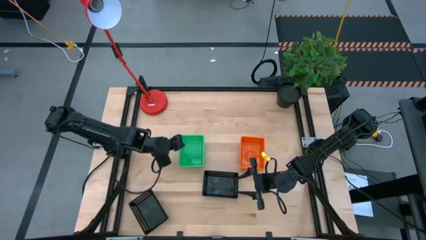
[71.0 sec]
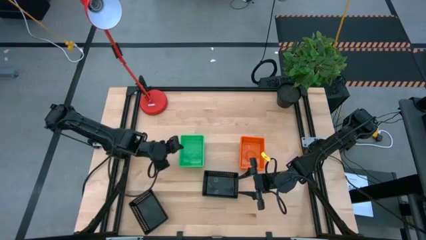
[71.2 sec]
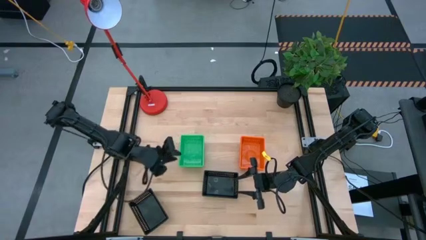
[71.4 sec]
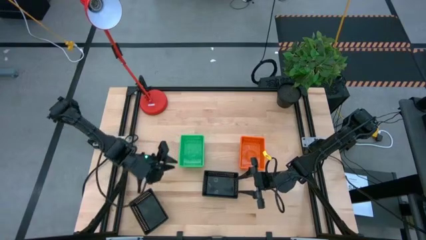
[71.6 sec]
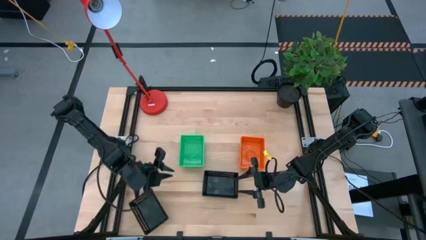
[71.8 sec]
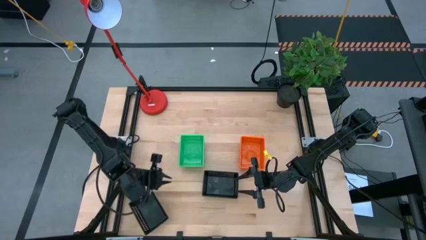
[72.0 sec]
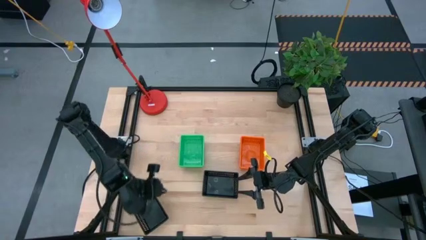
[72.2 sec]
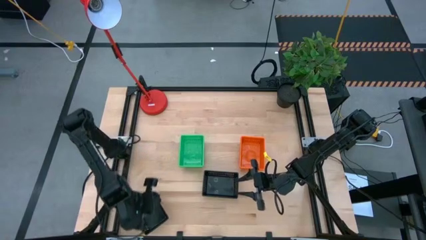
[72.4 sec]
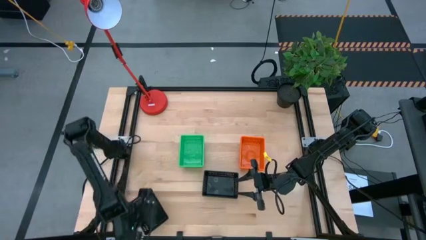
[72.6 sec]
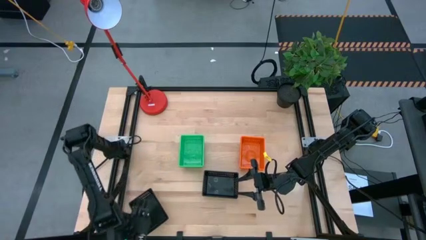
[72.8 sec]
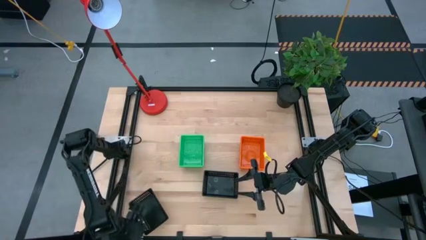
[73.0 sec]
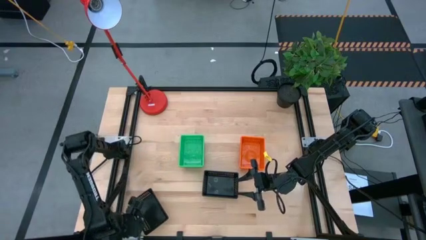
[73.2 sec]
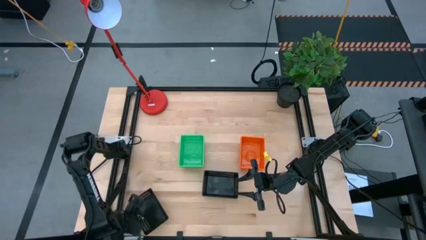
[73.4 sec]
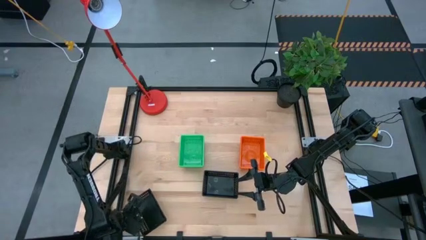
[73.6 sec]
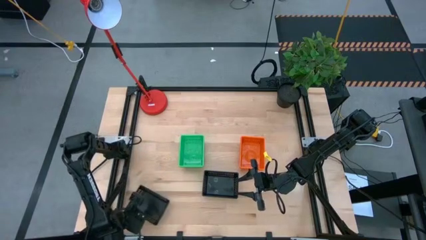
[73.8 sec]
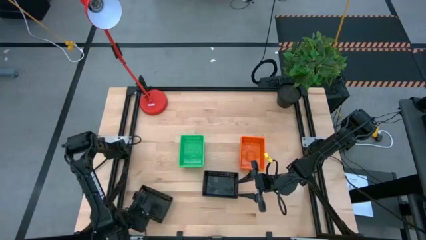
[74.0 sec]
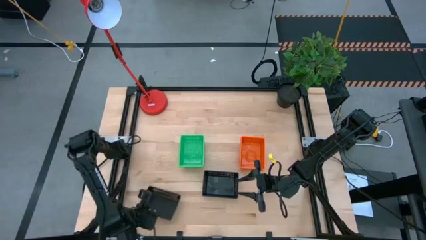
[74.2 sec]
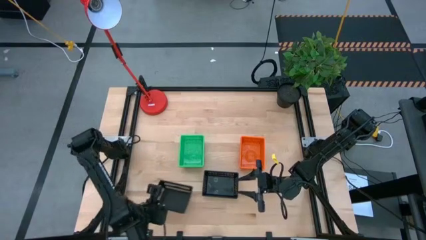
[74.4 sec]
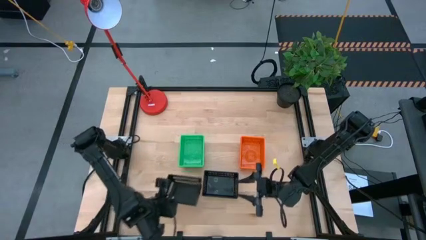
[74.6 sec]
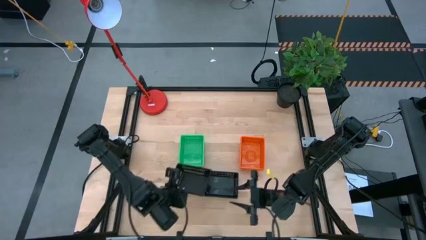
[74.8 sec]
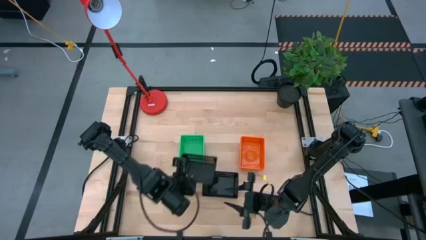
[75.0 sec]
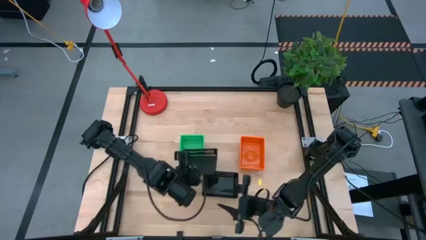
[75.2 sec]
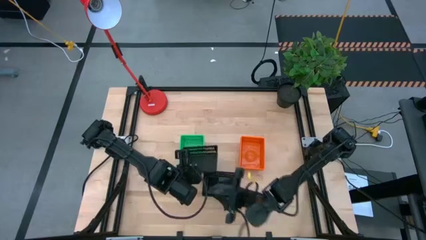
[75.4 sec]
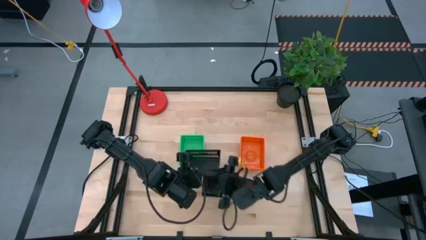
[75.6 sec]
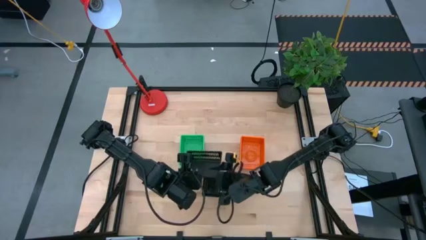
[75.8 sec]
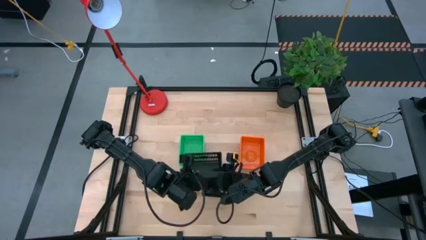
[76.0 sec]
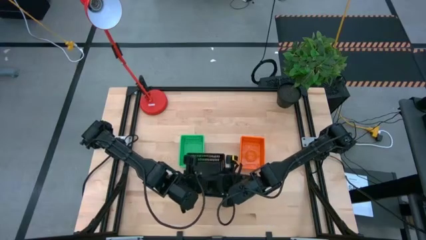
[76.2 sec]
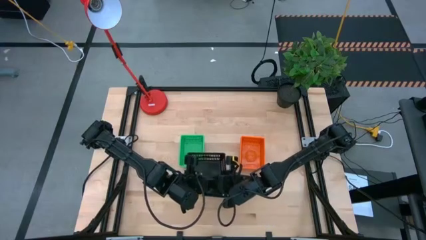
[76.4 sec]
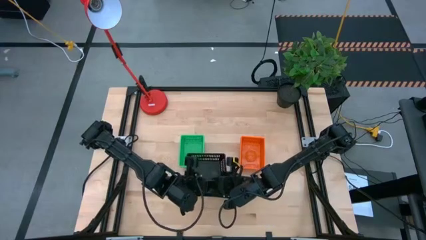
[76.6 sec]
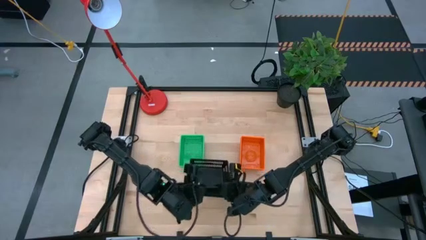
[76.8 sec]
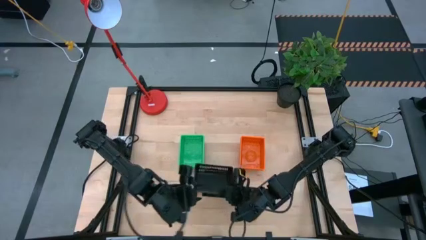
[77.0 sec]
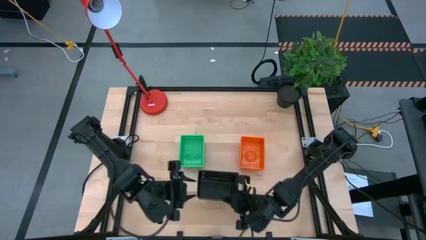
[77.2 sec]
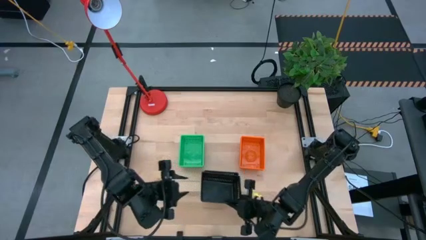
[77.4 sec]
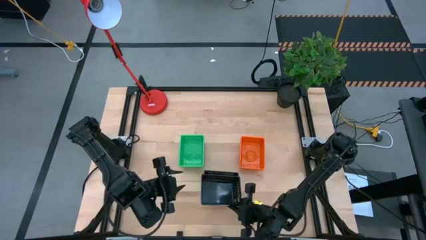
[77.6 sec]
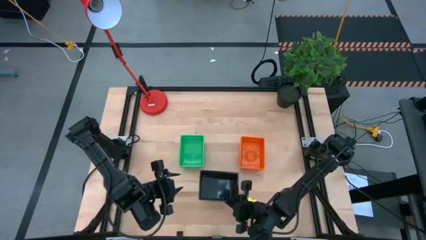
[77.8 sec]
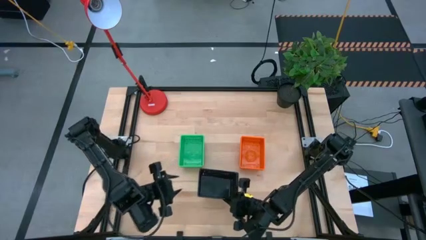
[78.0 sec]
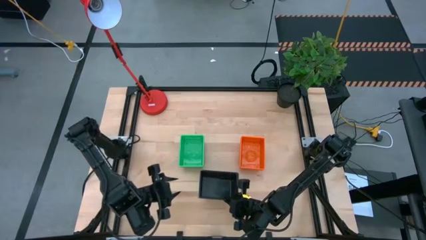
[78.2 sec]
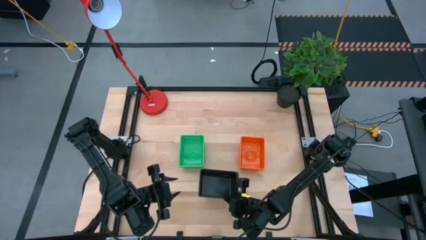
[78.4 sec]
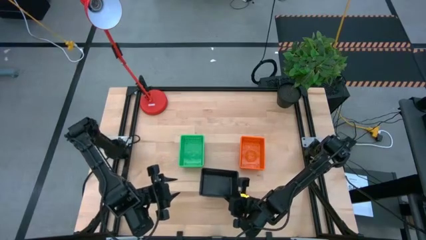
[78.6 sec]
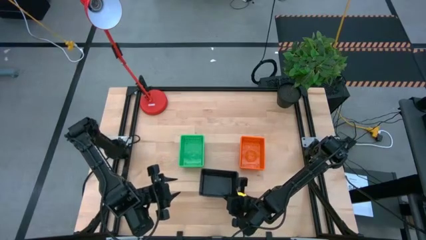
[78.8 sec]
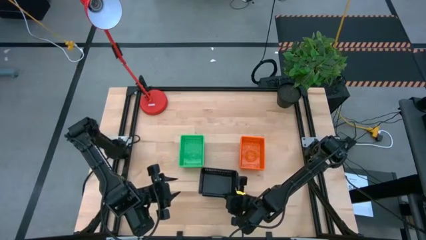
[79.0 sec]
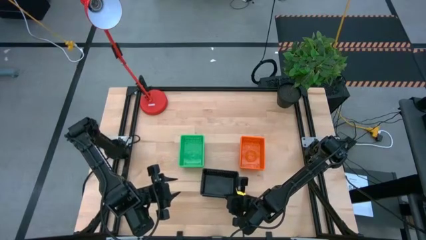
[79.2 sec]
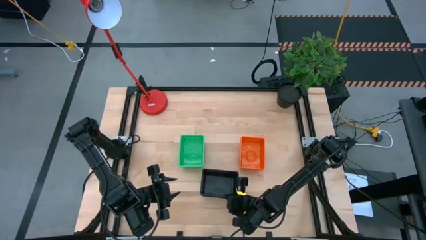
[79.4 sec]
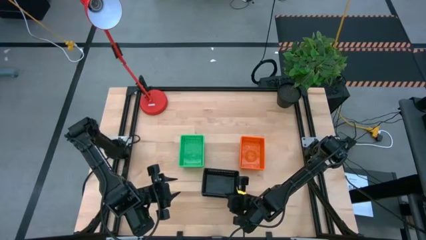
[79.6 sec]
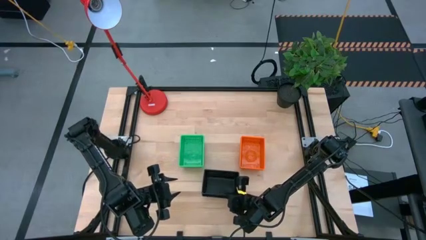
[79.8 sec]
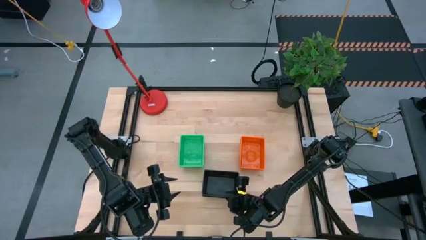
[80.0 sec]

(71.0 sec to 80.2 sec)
Stack the left black bin on top of the right black bin

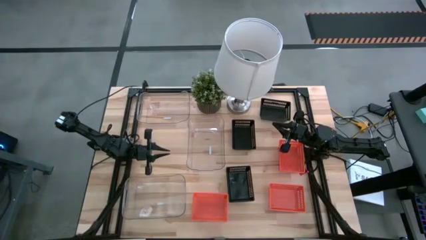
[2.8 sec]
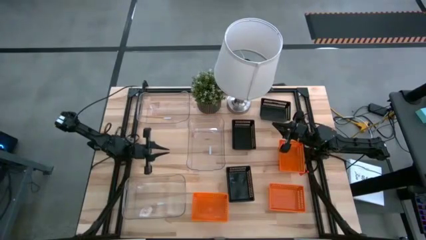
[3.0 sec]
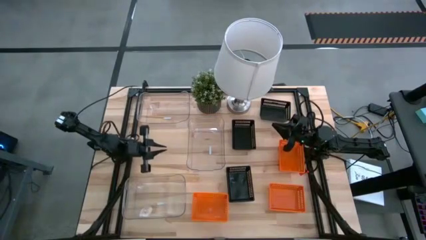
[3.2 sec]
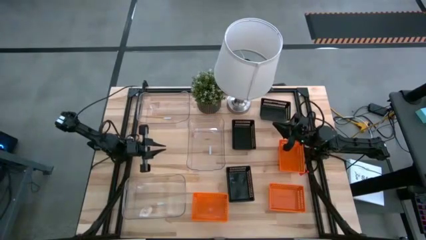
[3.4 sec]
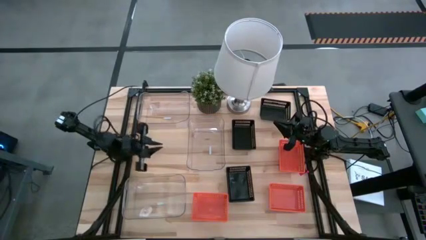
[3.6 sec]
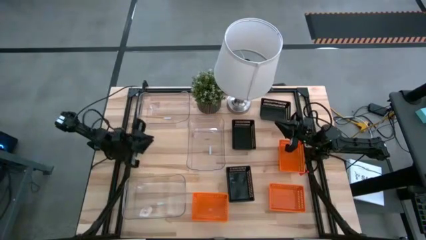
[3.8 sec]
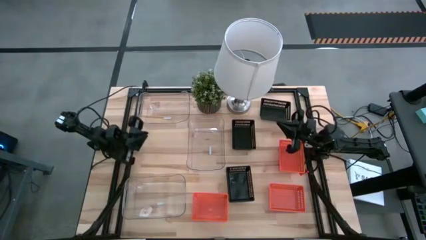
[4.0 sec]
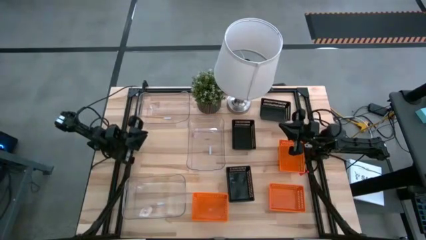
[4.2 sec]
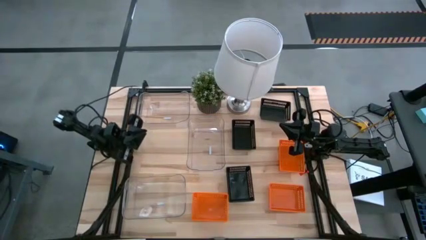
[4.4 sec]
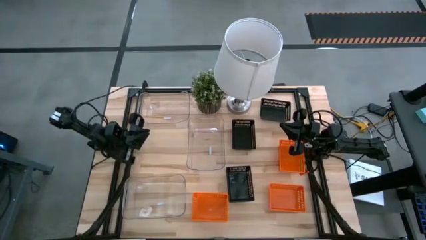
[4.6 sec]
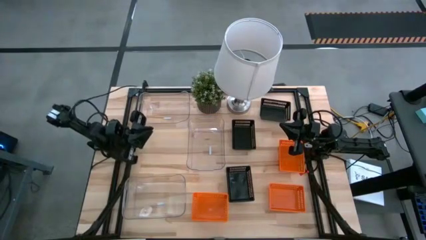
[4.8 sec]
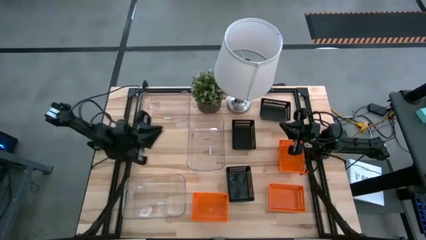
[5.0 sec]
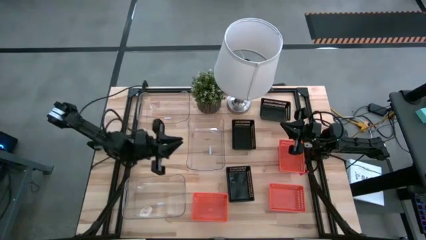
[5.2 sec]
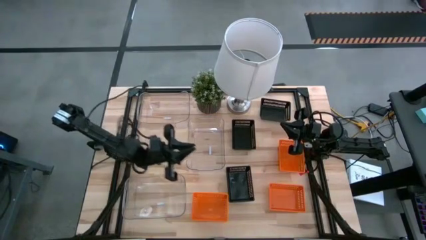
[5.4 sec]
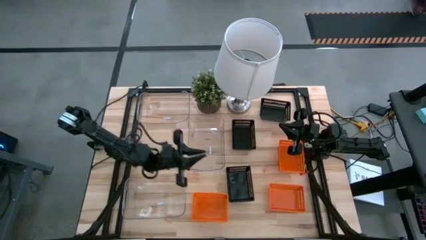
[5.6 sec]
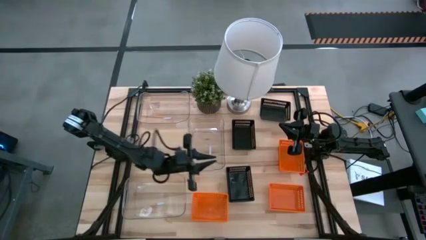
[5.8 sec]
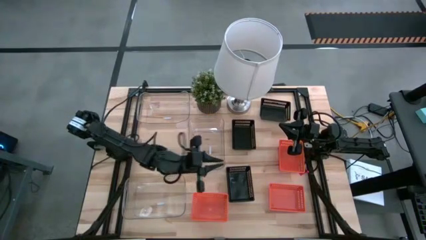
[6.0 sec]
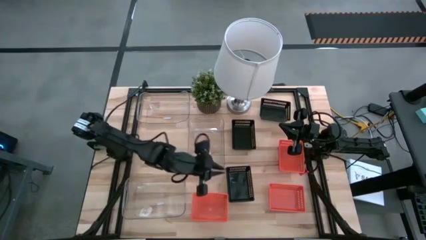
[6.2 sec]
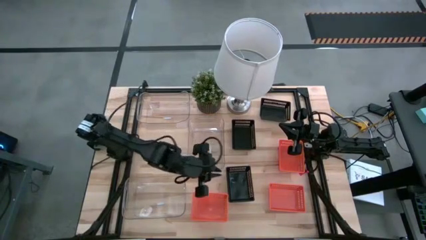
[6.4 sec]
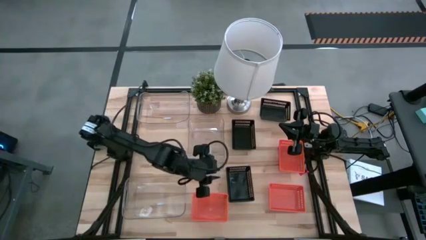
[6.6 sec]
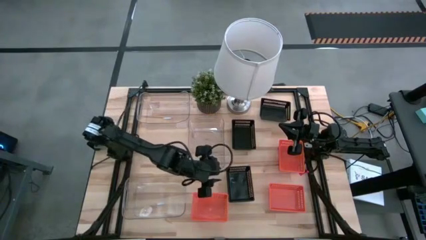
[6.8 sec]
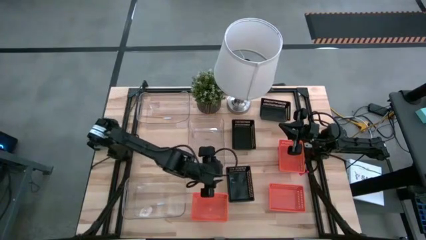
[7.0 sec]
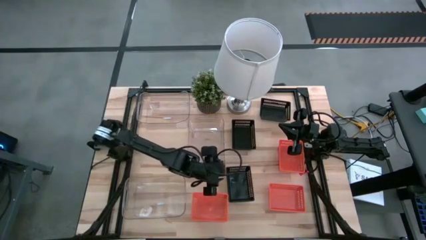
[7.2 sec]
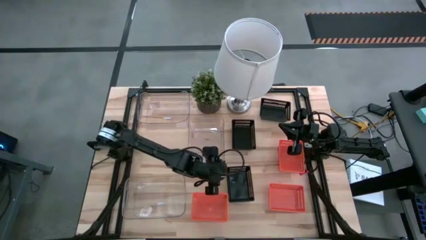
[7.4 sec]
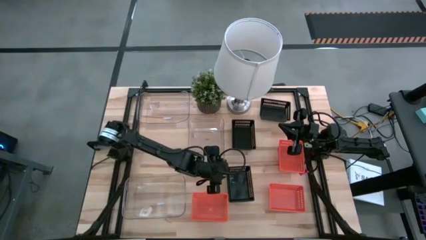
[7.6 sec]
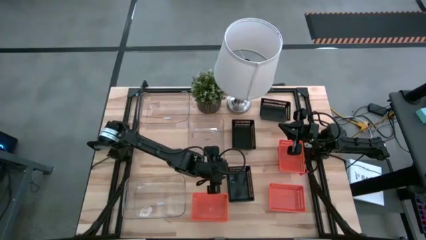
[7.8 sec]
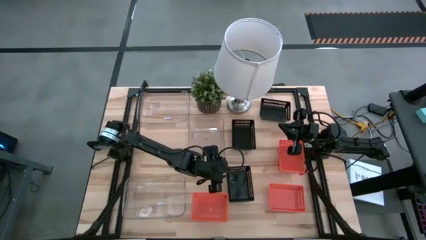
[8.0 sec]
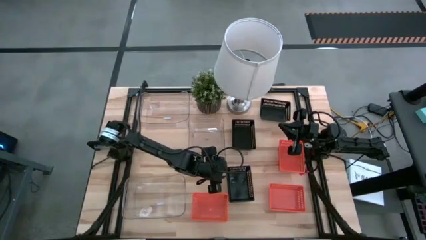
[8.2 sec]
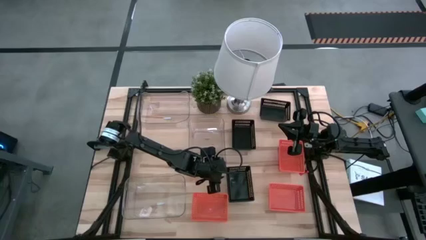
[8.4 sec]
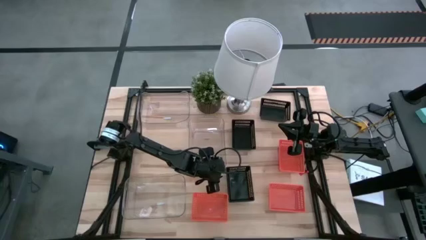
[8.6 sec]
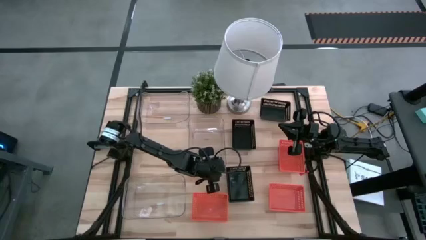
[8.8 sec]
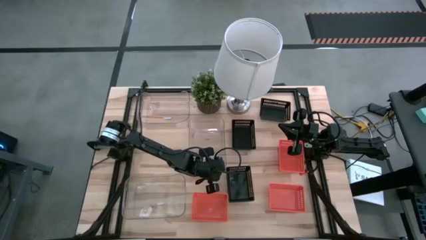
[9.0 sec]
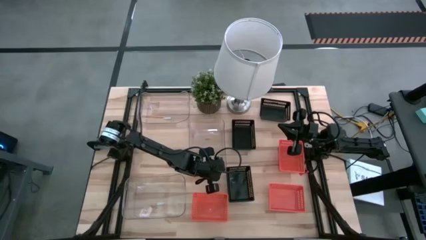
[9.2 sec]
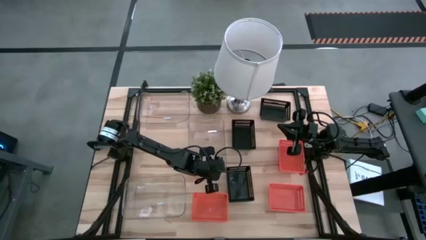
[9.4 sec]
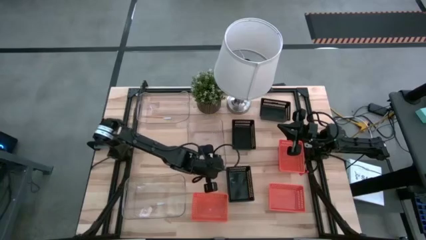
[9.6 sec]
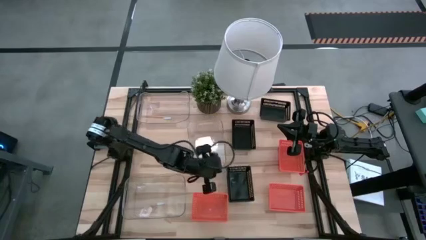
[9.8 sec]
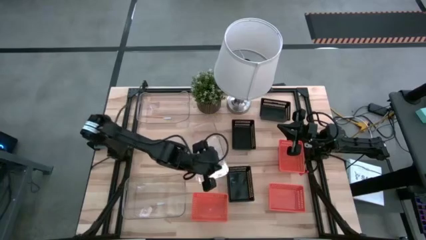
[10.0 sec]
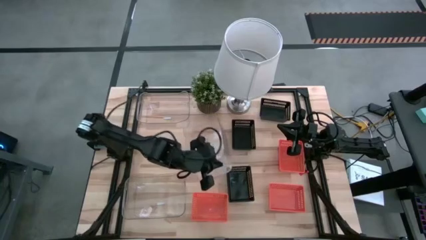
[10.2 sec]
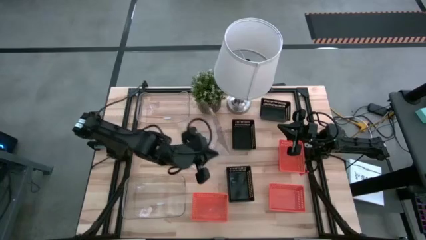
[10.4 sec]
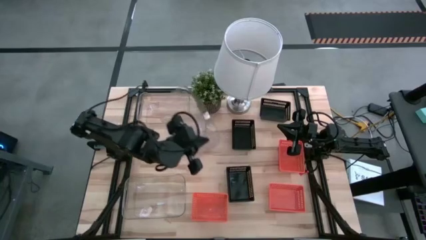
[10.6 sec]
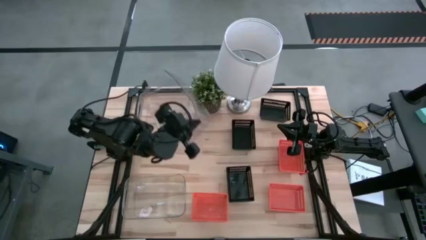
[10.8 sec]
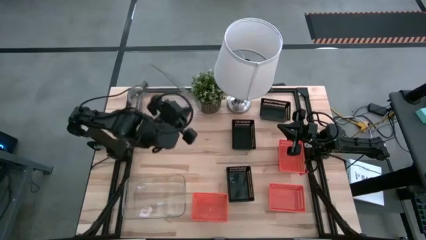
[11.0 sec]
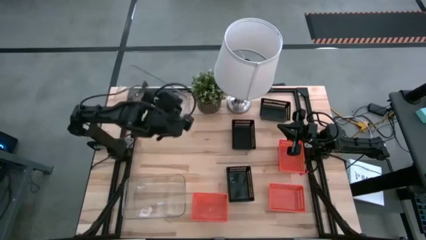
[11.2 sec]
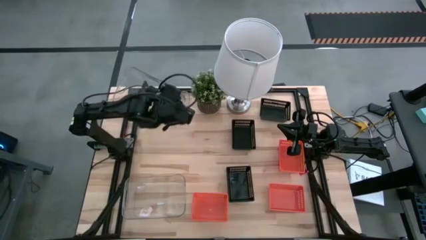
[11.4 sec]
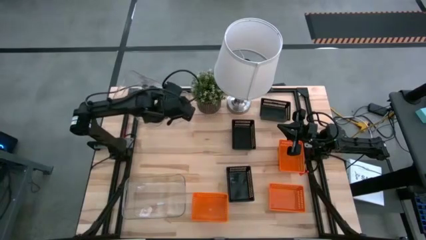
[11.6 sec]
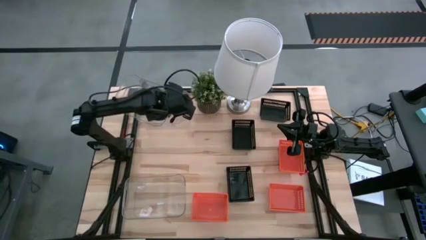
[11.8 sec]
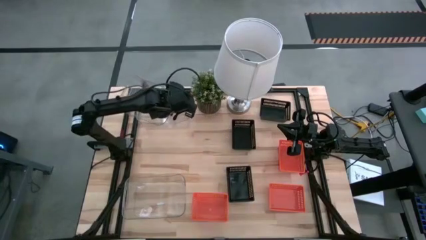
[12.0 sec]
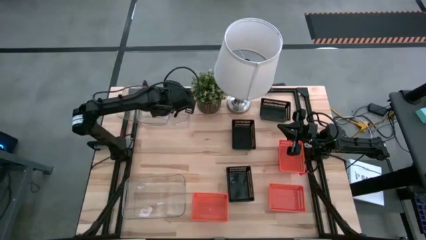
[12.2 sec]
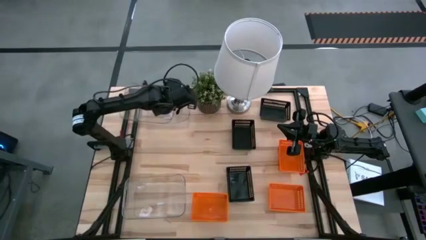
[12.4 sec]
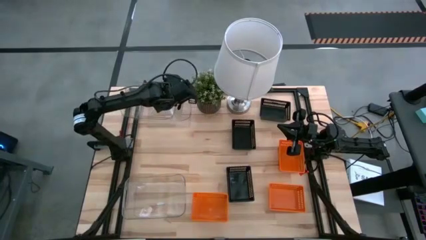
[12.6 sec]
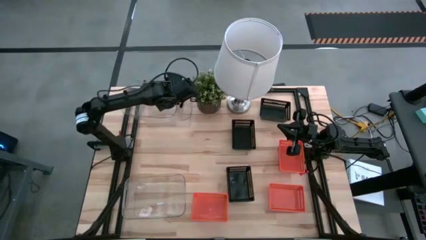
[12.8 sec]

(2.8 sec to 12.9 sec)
Stack the middle transparent bin into the top transparent bin
